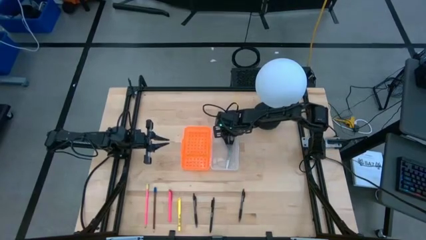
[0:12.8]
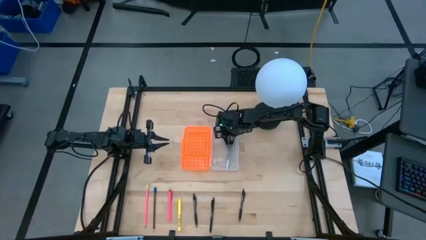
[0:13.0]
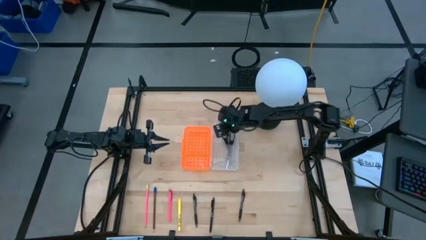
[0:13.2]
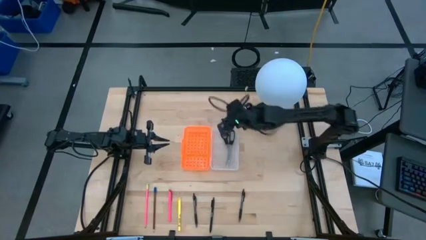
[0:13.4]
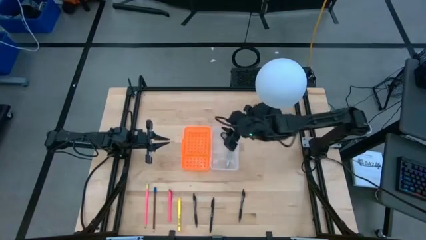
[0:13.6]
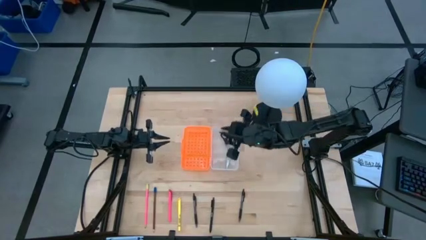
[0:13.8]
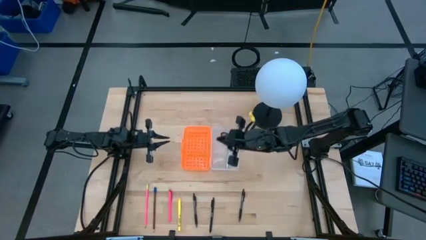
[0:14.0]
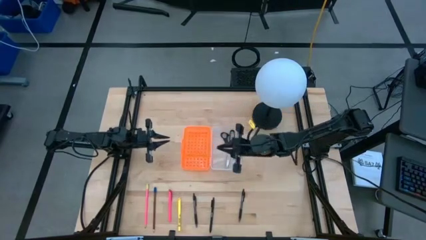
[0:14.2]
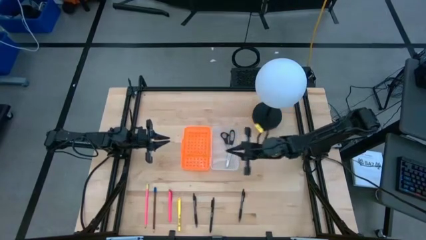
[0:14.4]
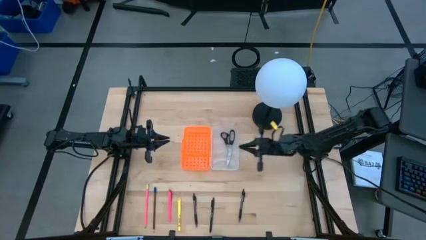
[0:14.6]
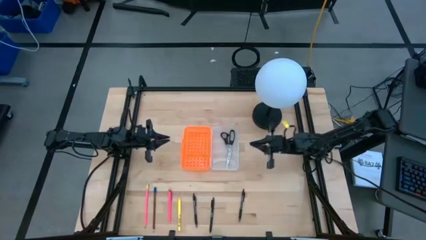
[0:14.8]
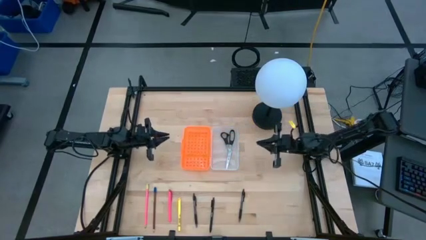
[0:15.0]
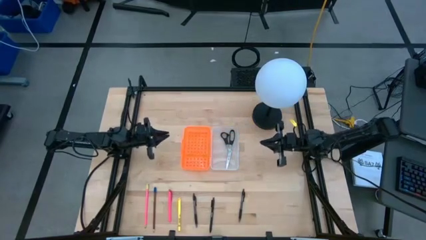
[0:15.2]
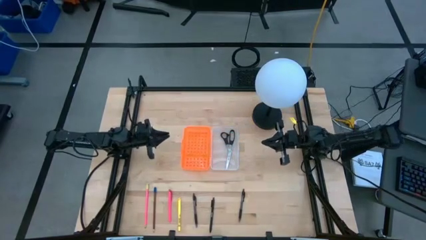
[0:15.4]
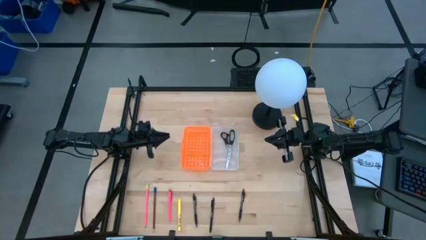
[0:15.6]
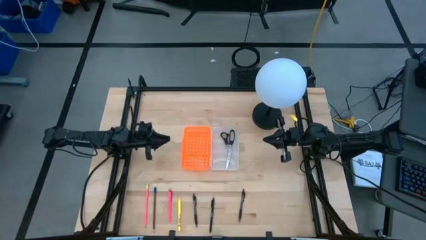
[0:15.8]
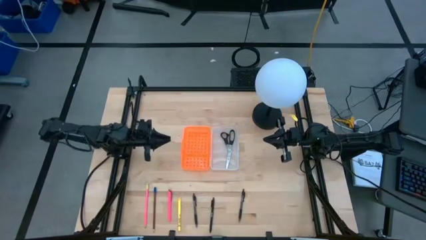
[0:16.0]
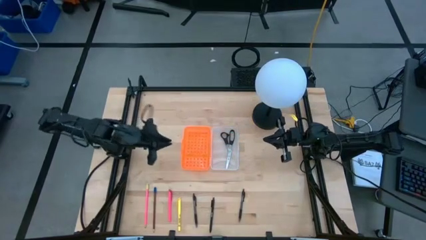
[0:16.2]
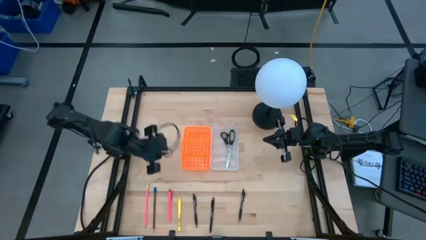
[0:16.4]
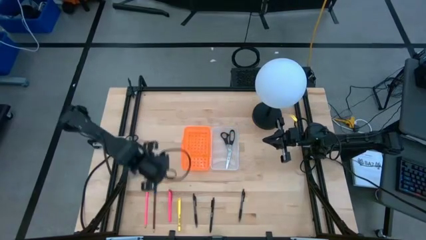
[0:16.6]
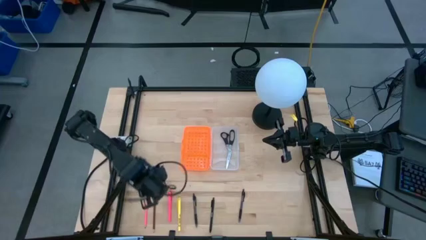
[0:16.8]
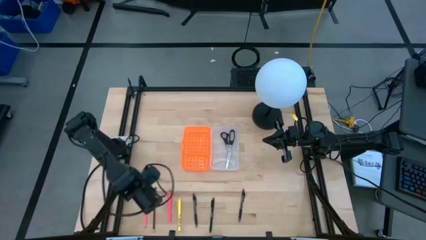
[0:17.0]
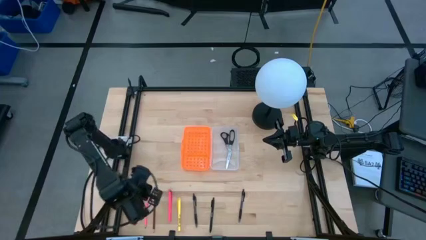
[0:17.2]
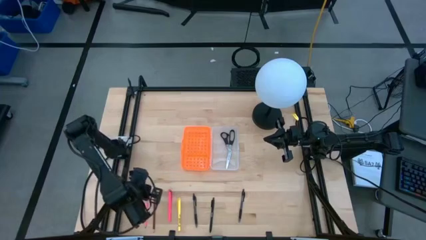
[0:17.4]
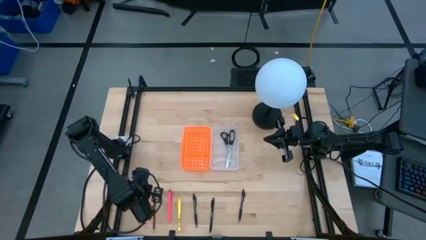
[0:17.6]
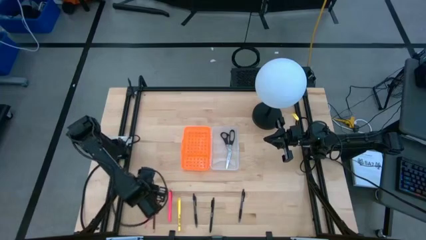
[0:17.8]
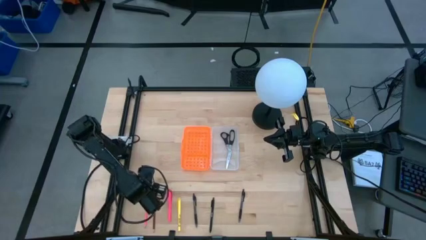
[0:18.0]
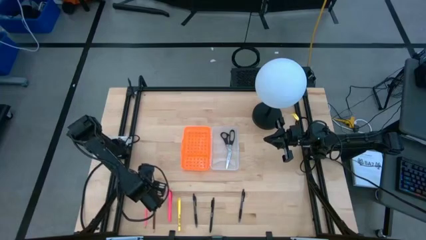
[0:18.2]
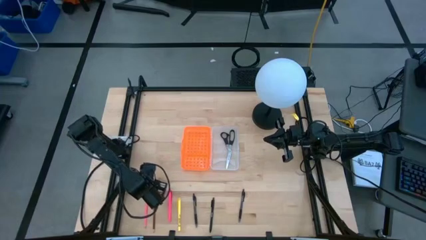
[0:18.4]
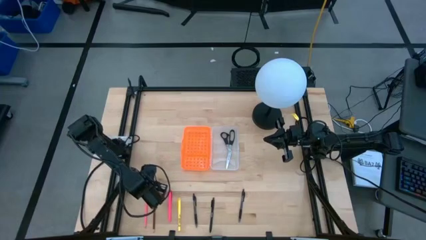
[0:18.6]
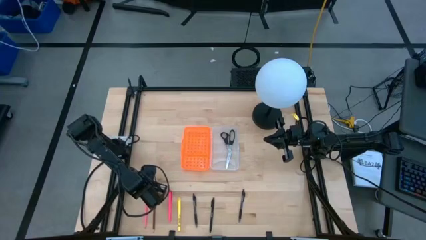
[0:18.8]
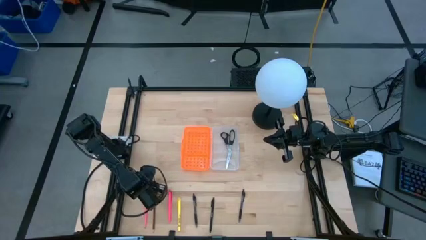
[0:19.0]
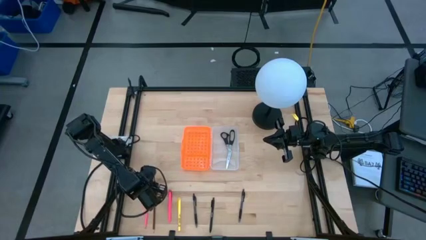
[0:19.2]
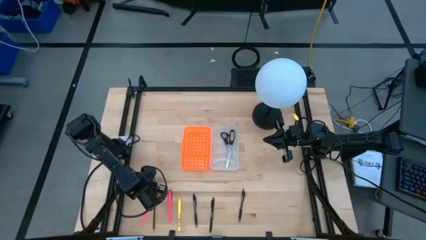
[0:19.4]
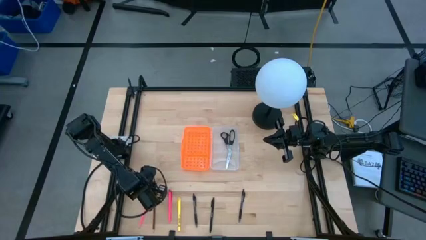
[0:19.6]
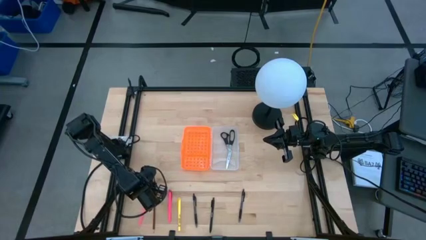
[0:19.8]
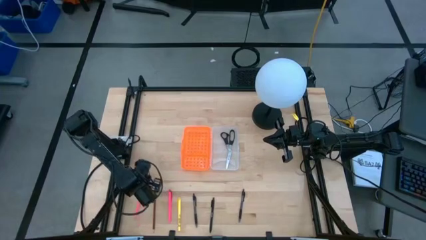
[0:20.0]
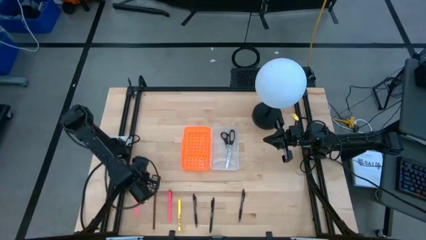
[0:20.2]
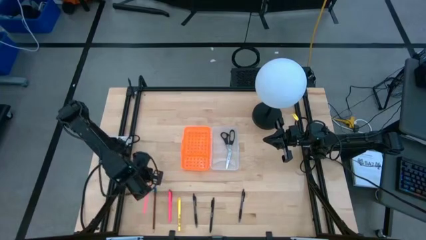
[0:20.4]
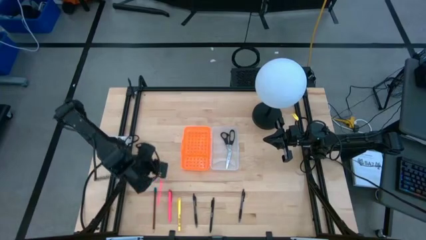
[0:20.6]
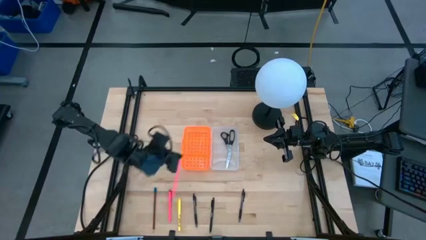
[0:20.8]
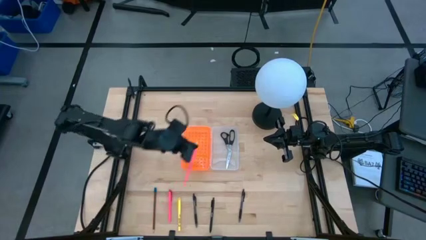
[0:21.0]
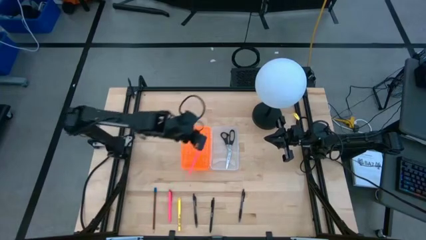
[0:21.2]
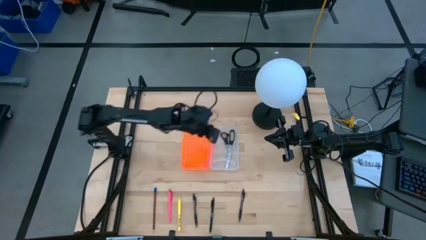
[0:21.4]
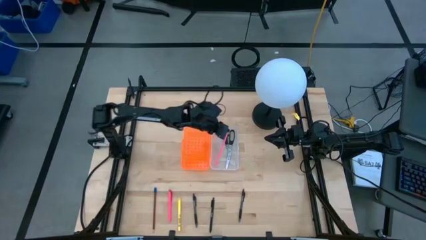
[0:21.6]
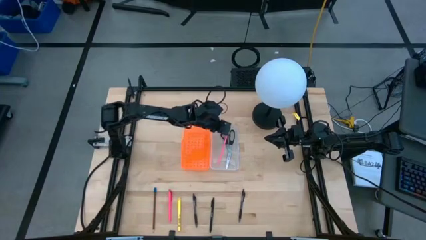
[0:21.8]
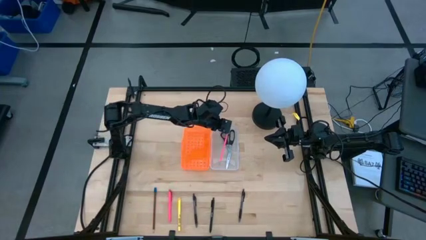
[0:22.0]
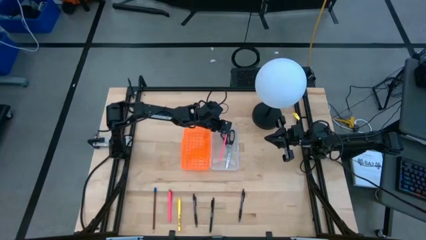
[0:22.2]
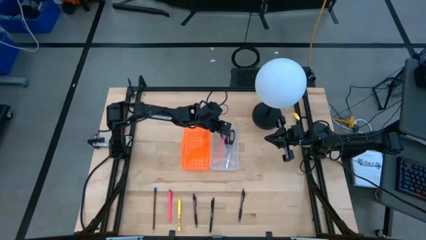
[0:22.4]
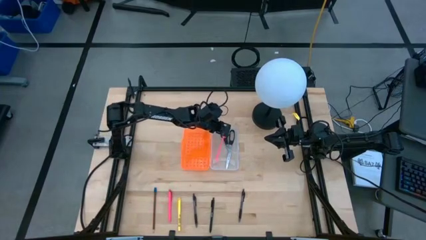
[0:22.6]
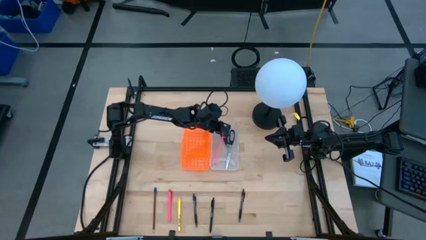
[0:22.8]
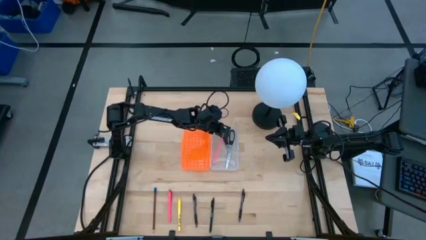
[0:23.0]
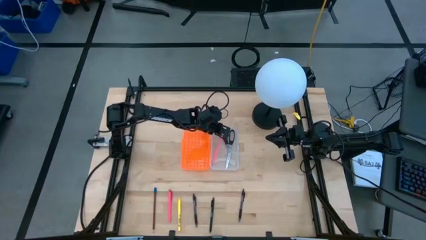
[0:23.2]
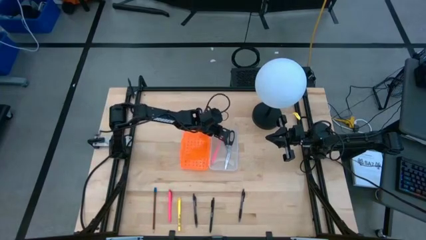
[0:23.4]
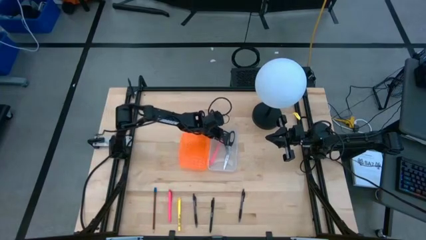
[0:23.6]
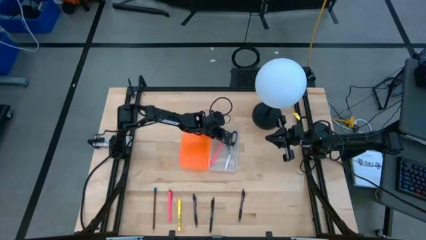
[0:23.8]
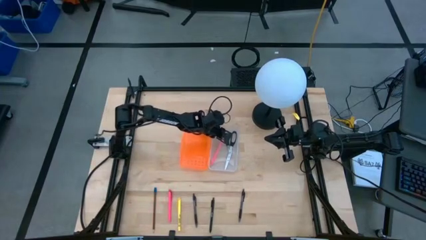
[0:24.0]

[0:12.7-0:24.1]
Task: Pick & place school supplies into a supply box
Put the pink pencil into the orange box

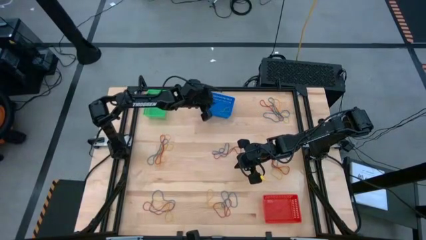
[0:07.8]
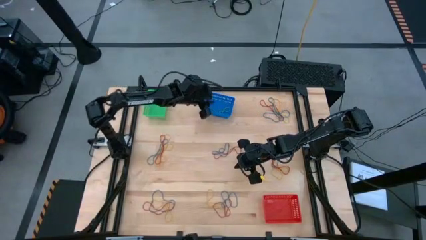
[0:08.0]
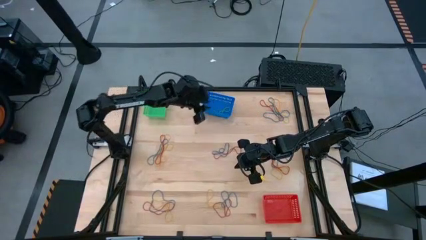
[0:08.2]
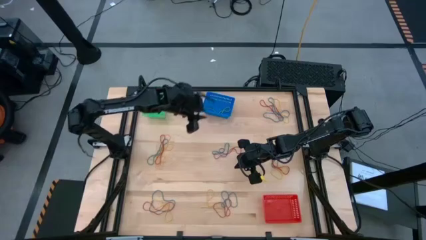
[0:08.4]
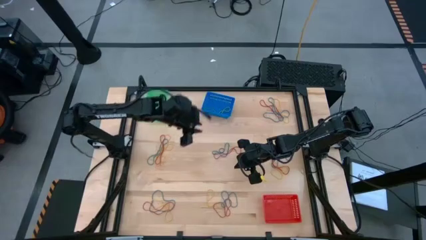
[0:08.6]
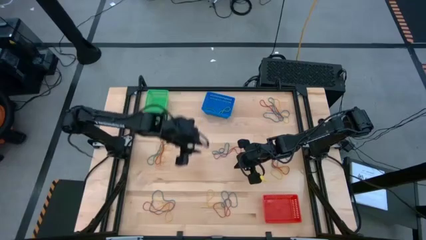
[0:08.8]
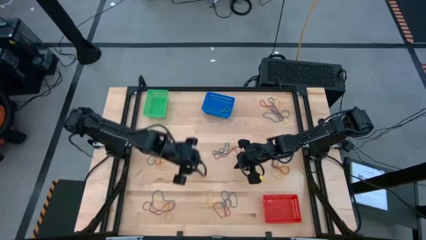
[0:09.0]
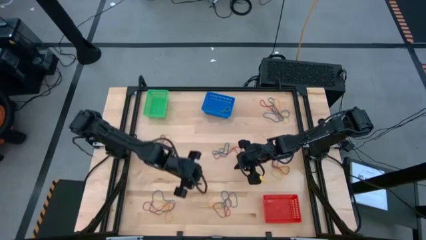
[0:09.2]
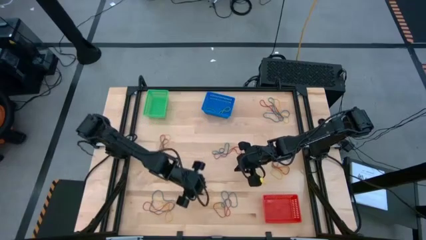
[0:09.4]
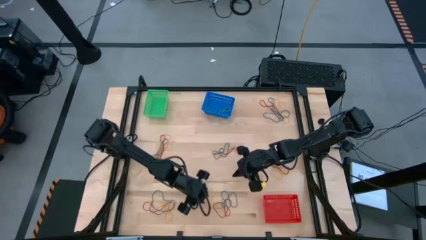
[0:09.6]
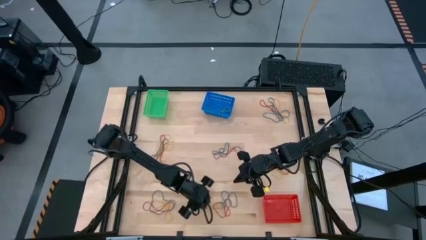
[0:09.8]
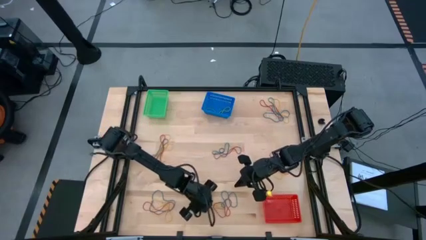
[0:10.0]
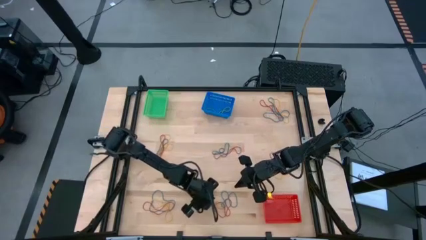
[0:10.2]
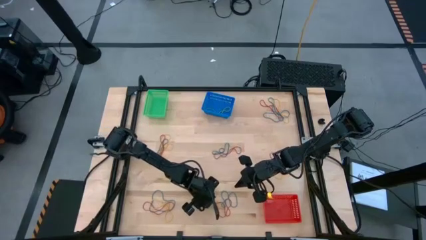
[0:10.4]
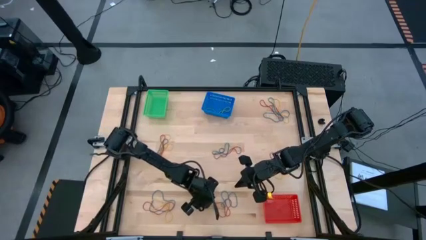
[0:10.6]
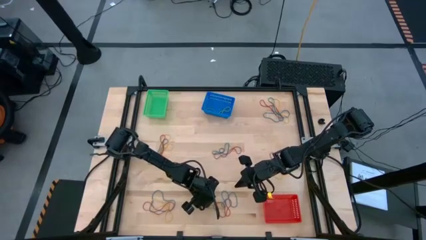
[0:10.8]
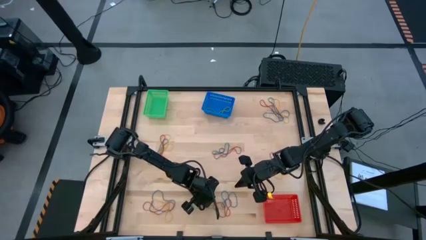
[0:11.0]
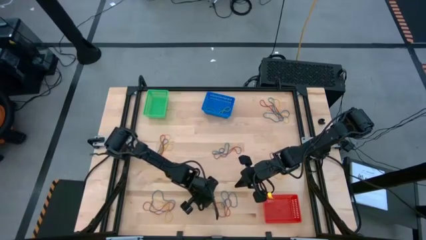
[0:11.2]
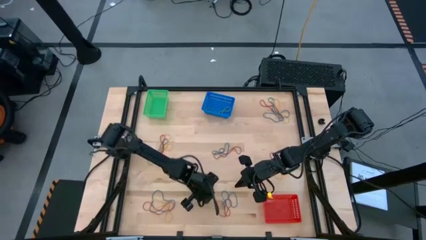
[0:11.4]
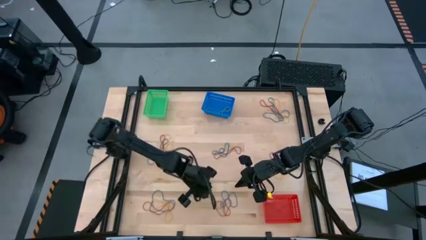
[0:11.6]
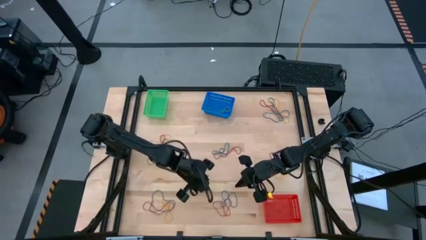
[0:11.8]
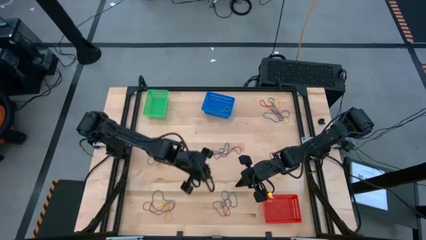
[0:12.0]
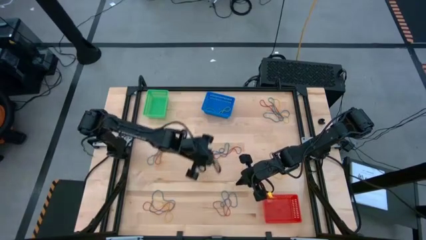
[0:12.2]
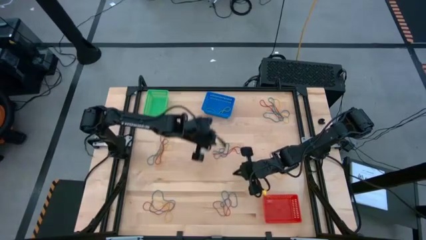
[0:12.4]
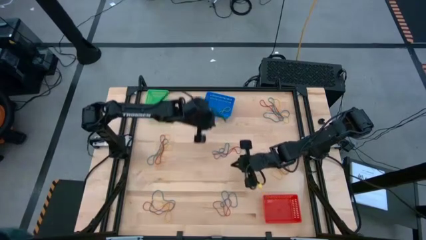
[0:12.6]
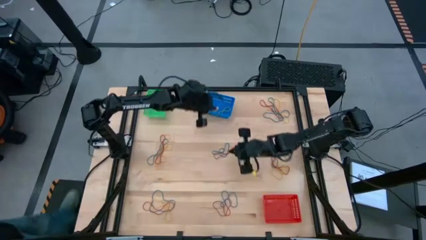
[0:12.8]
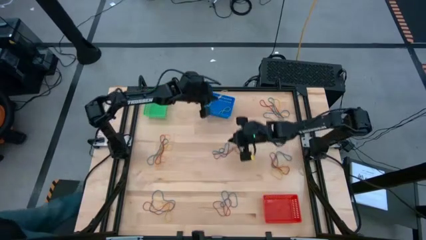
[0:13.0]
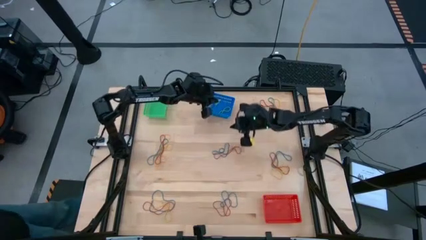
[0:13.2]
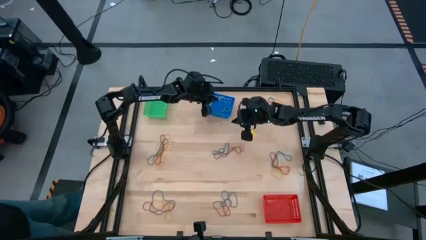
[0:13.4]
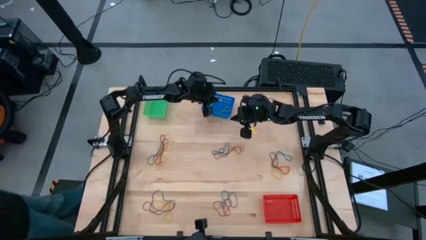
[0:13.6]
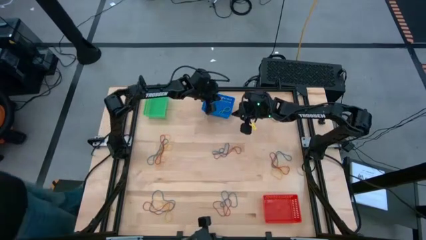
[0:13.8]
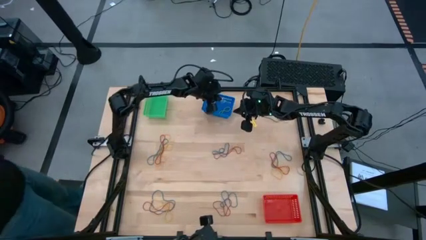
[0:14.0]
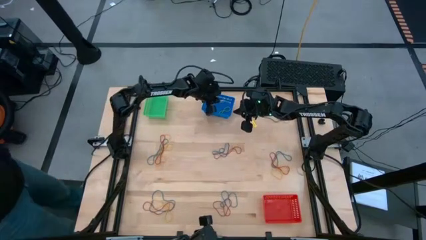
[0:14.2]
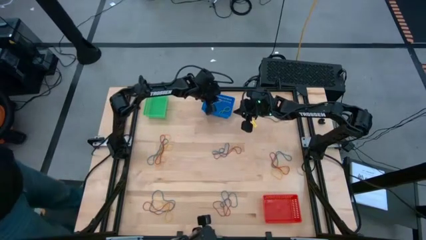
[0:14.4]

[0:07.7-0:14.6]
Task: Sort rubber bands into baskets
Put the yellow rubber band into the blue bin
